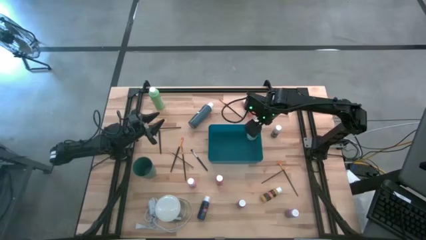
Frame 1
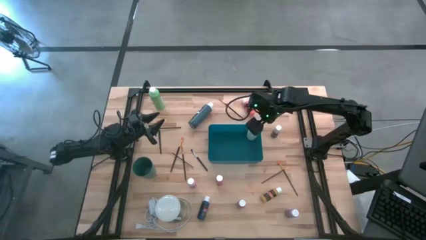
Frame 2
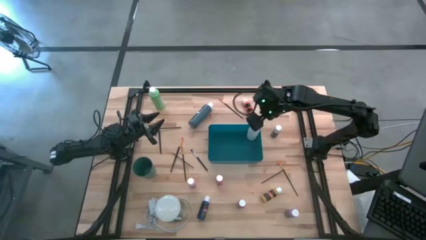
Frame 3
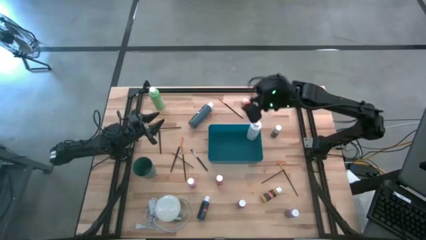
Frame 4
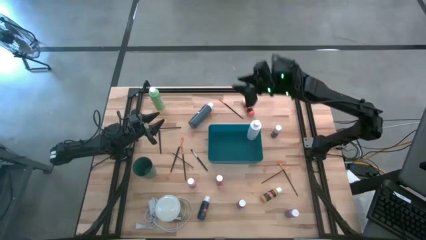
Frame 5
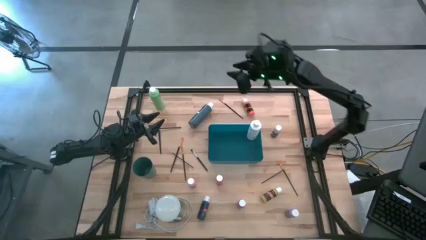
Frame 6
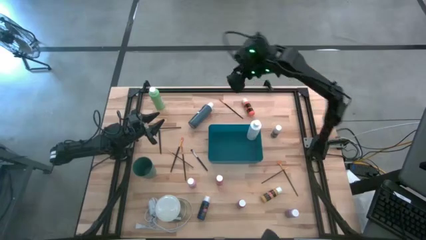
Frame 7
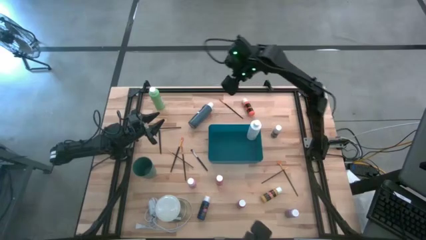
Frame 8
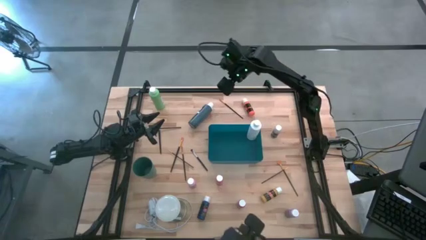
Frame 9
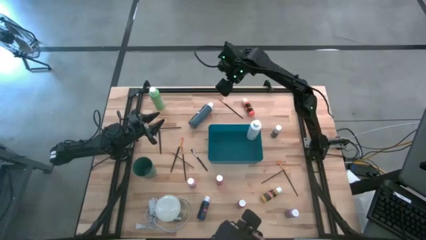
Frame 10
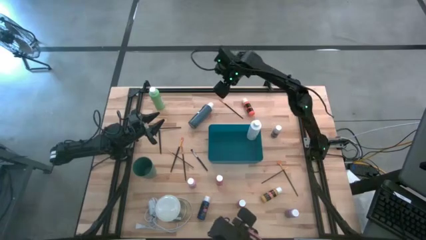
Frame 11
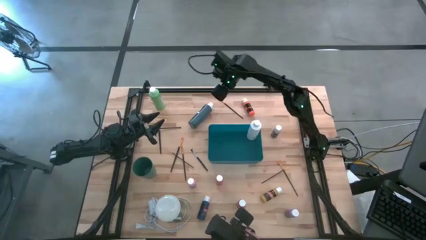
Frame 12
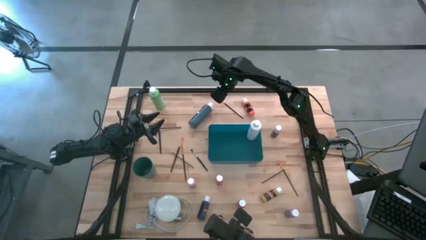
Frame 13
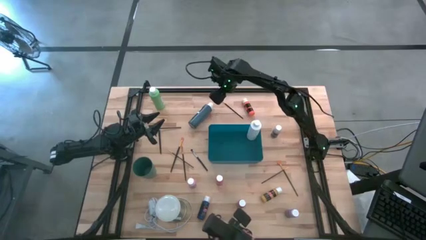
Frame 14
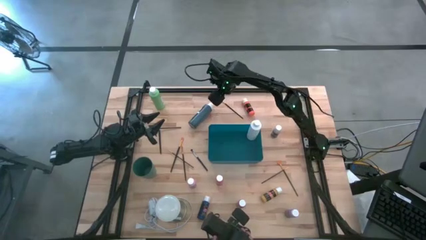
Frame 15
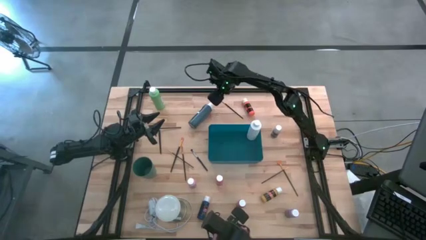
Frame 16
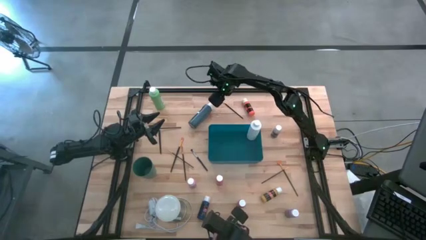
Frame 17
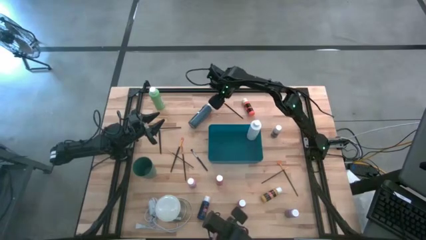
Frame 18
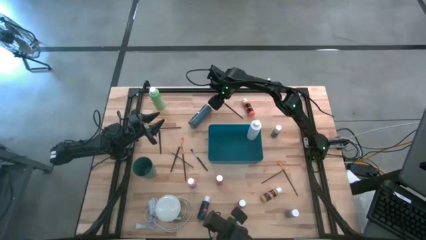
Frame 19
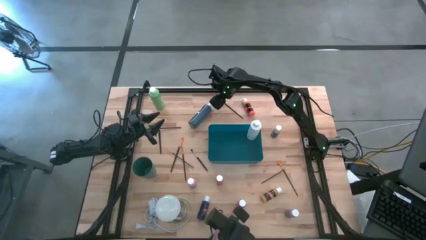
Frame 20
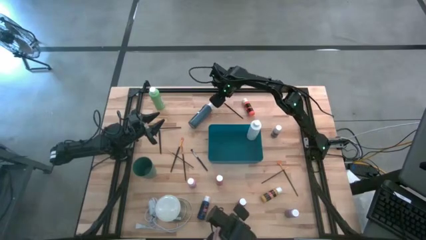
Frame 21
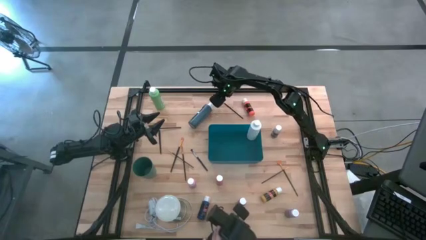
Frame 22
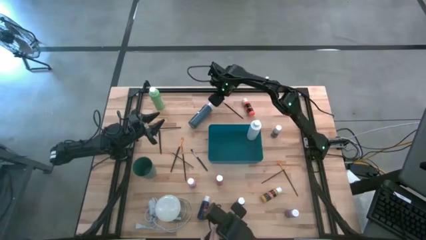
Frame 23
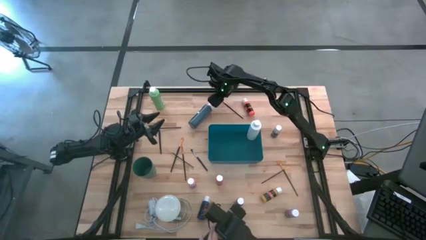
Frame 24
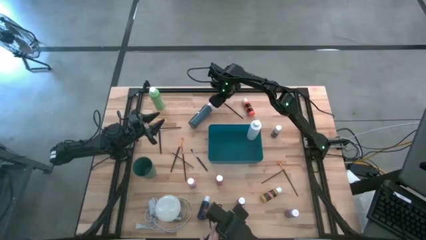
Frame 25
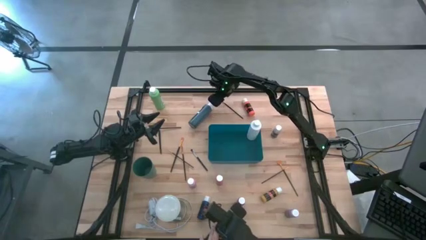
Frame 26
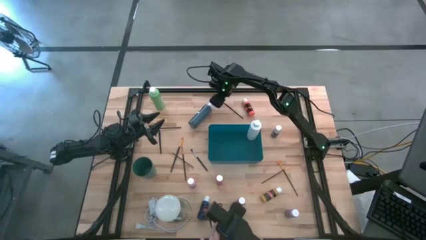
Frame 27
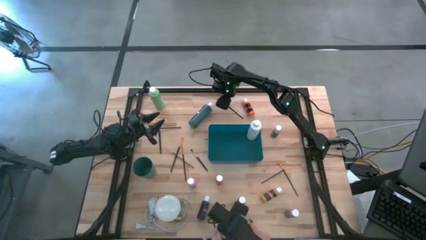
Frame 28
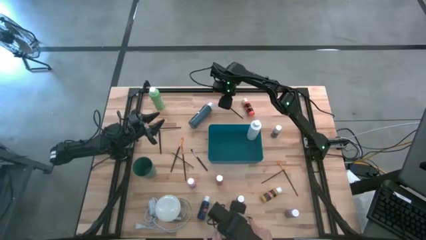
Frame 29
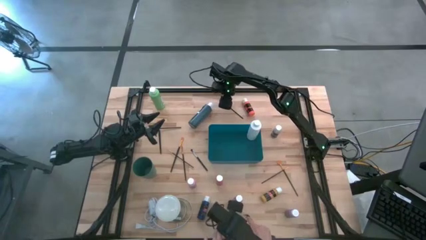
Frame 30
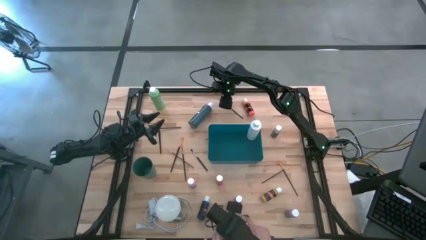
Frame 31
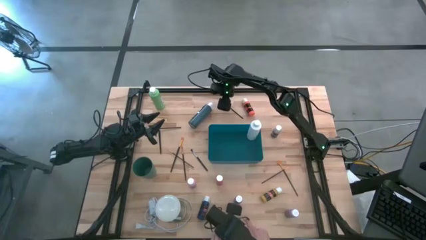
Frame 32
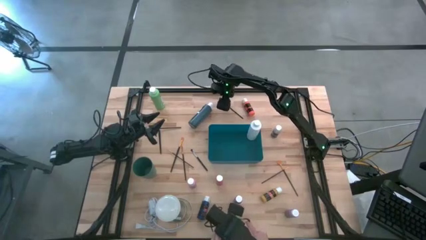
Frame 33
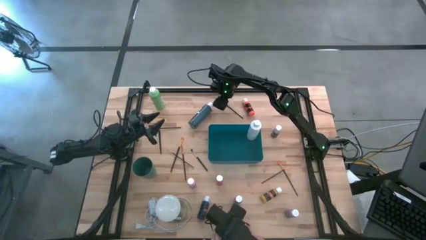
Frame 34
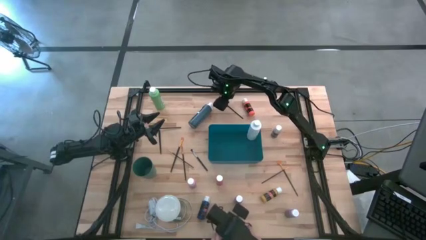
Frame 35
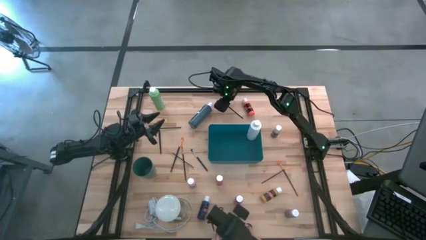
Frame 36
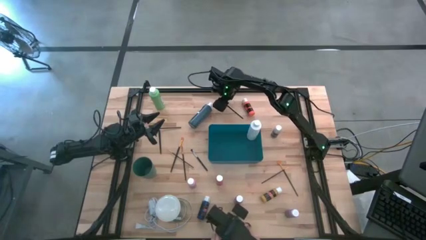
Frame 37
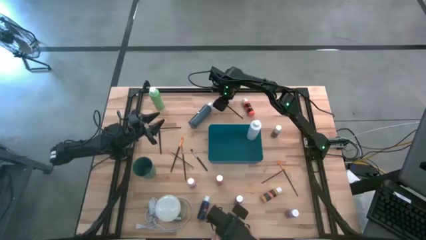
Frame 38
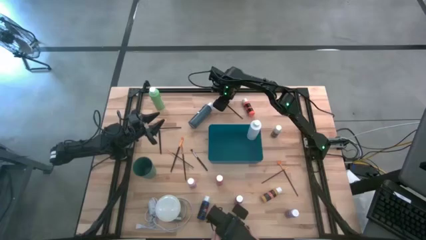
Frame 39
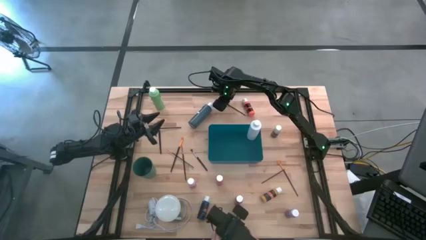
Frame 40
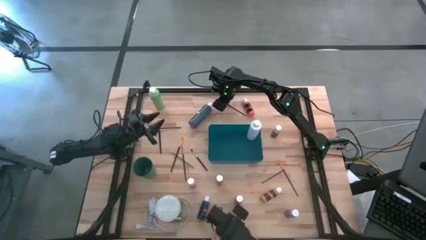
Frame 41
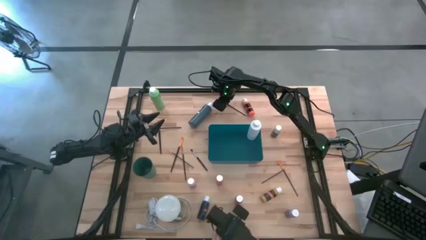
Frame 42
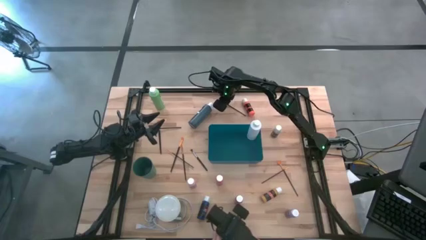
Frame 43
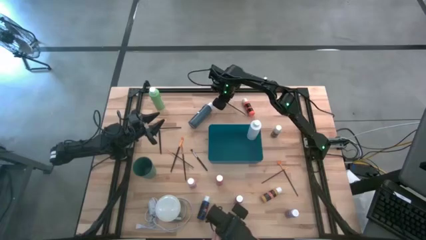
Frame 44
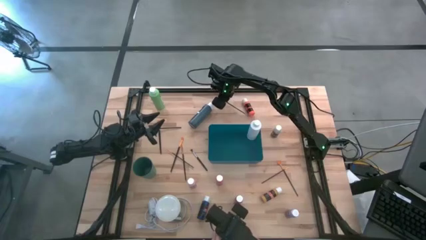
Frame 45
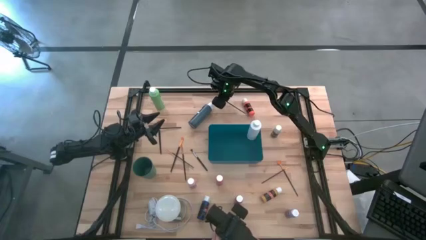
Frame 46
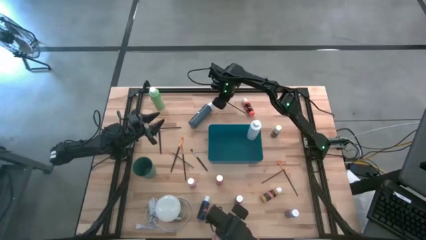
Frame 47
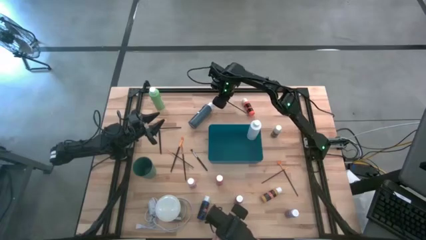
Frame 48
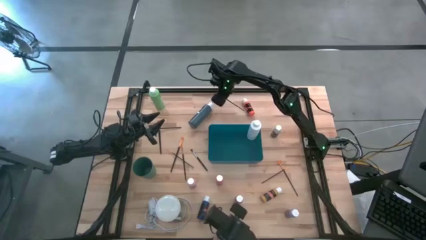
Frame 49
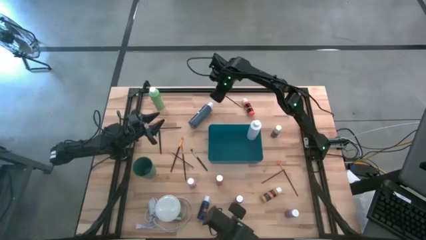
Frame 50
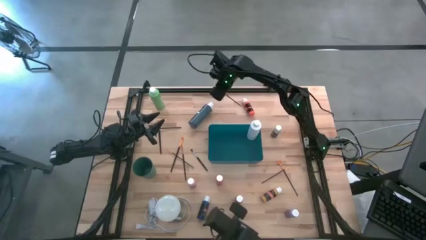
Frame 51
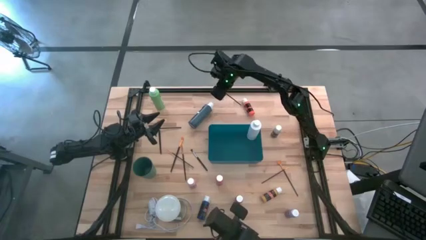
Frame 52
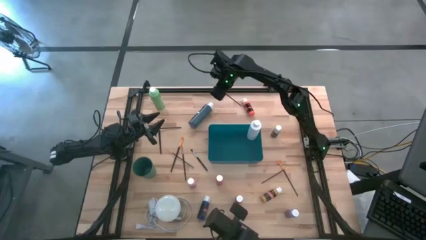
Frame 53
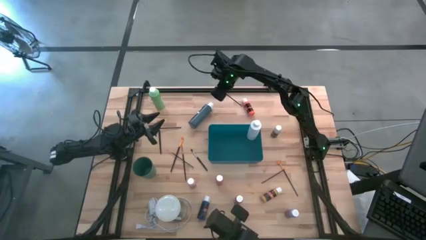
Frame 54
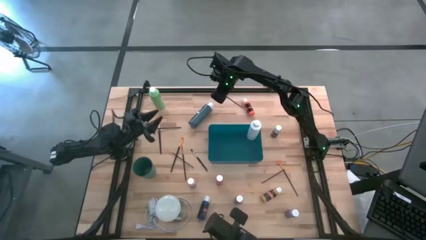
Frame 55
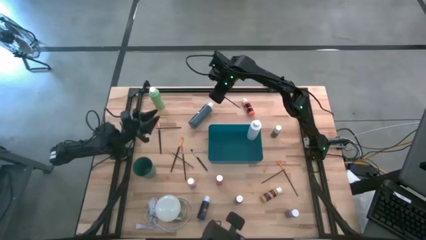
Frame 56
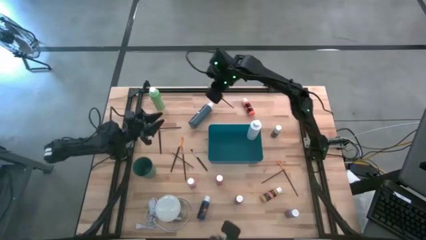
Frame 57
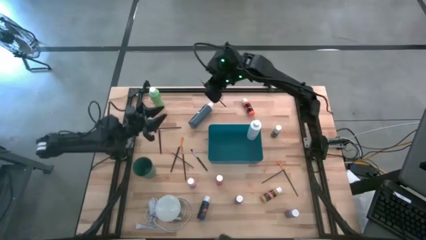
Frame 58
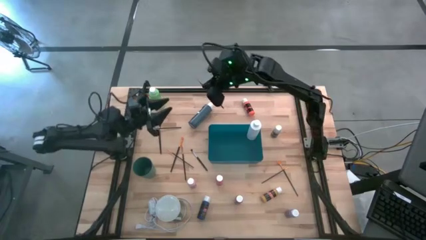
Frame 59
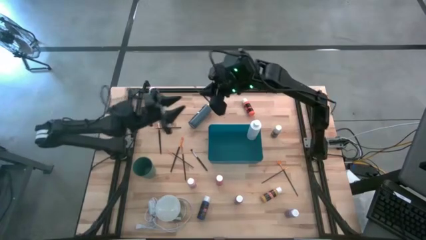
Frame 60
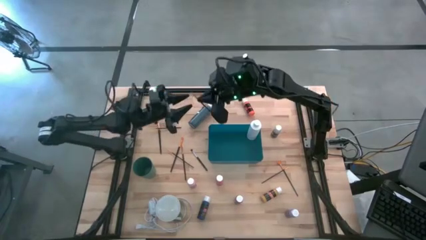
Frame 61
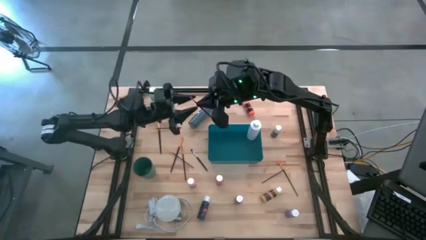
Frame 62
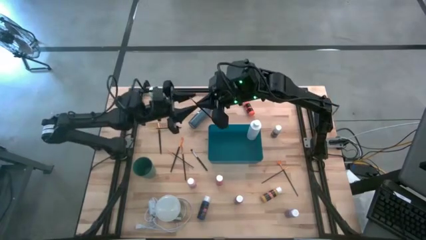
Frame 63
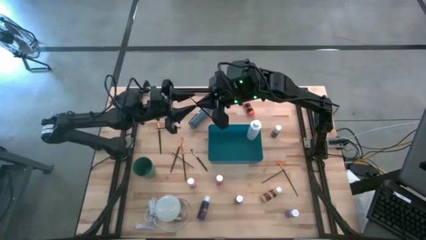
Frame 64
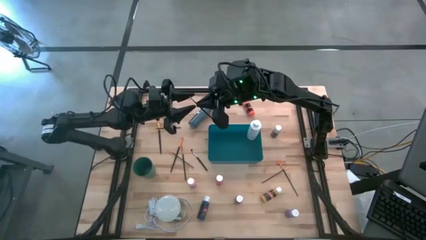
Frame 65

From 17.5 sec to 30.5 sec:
Task: Pick & Place Paint Supplies
Put the gold paintbrush into the green cup

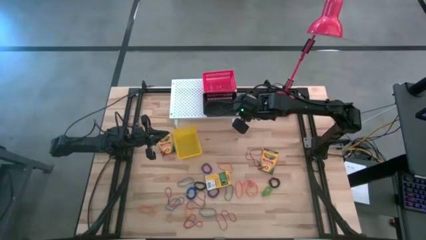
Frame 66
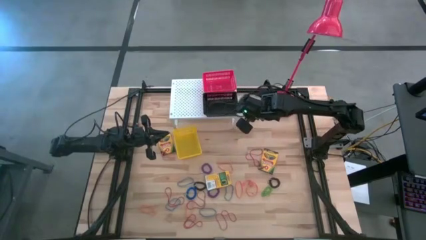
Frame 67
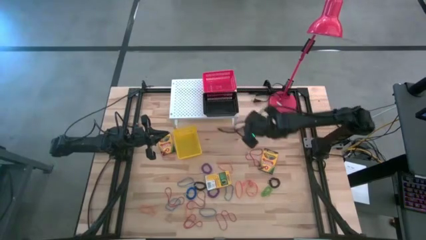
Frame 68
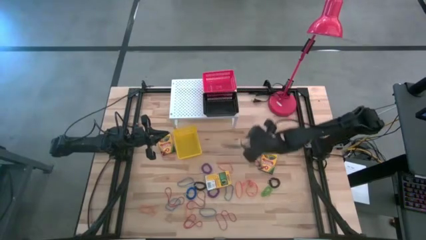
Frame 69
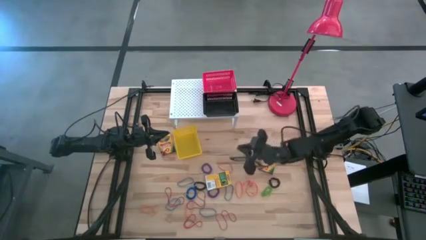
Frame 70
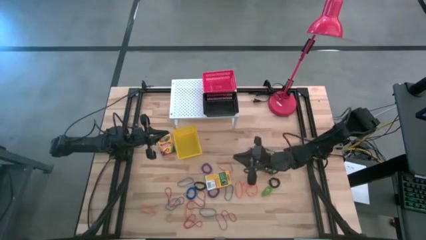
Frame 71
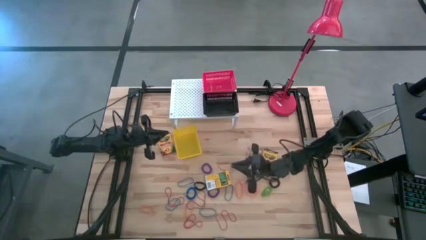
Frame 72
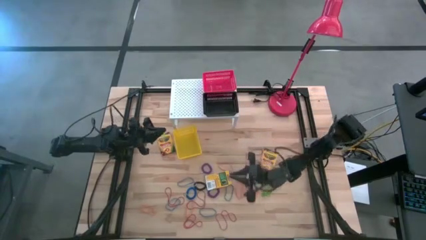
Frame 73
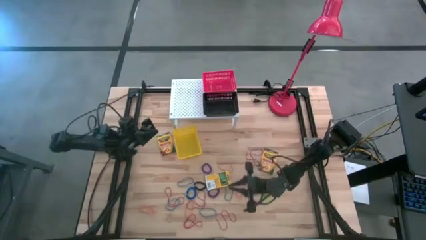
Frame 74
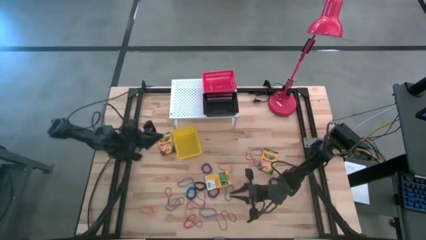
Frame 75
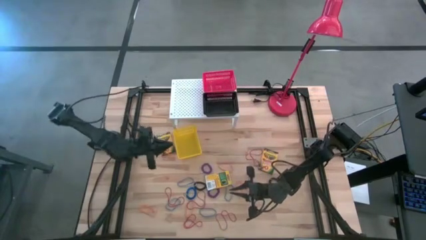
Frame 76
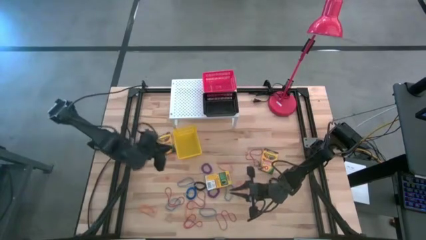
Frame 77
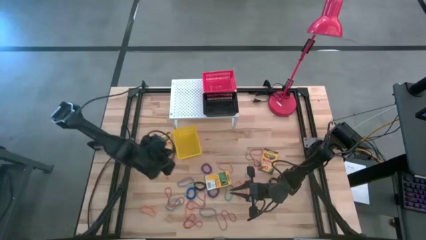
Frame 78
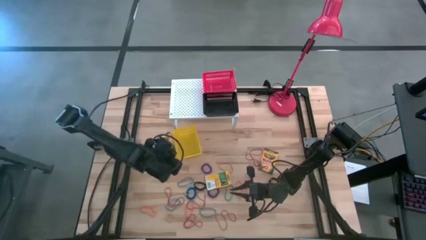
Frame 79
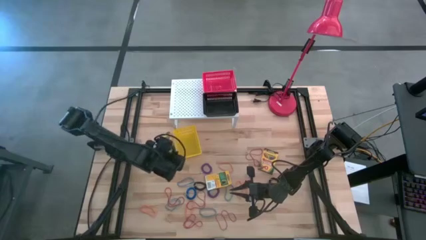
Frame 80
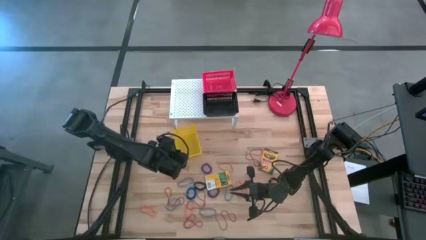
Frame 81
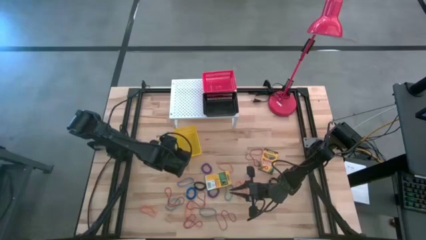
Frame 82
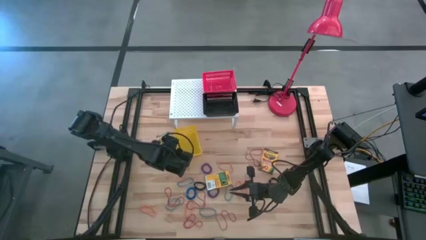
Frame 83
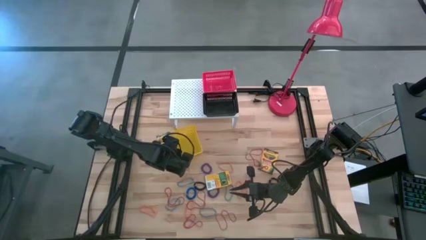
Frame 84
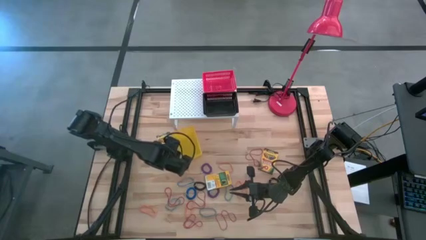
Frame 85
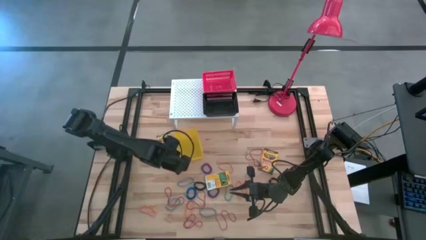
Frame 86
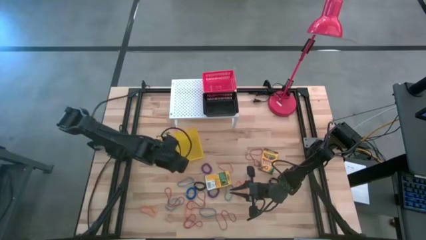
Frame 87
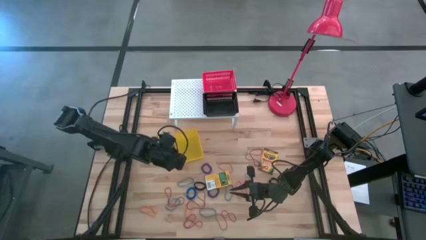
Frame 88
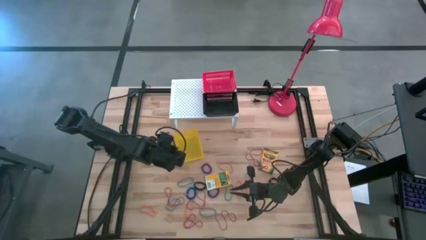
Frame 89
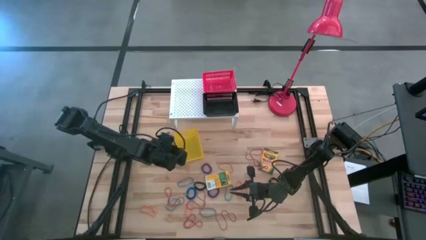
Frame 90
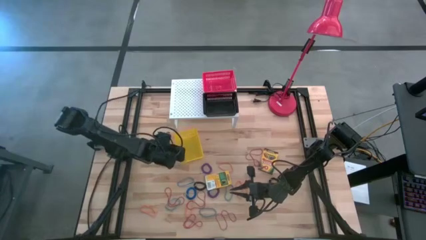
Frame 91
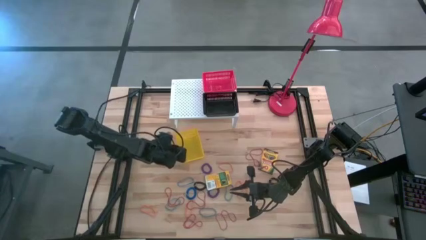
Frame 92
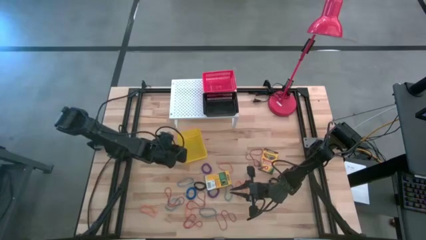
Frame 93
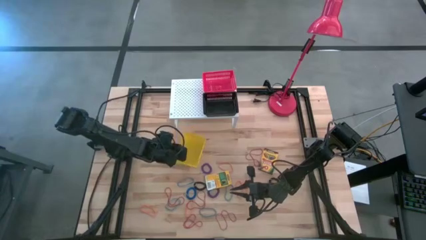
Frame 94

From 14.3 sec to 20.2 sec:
Task: Pick & Place Office Desk Supplies
Put the yellow bin on the shelf
